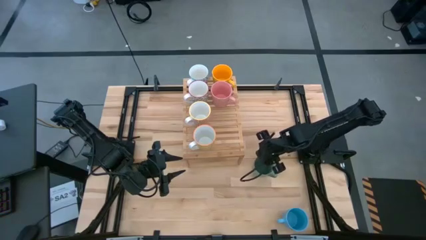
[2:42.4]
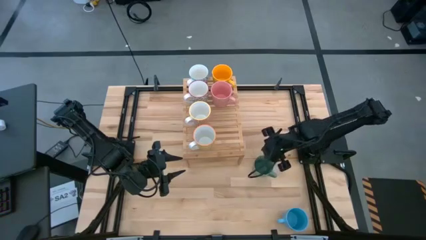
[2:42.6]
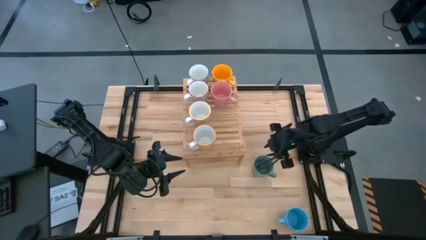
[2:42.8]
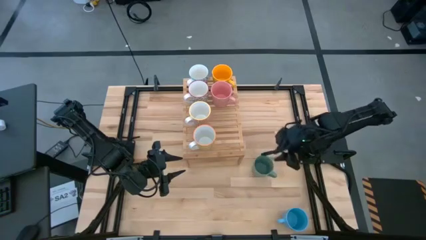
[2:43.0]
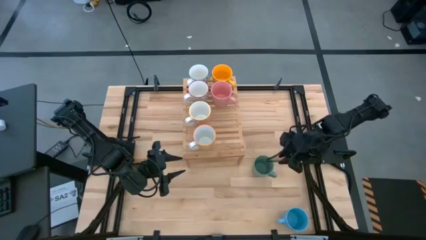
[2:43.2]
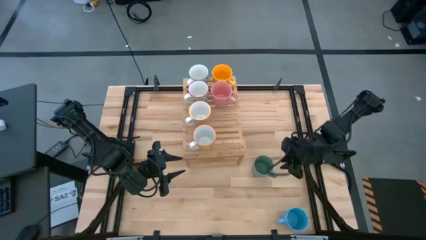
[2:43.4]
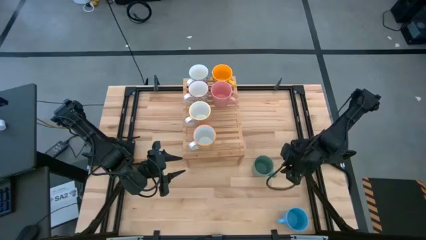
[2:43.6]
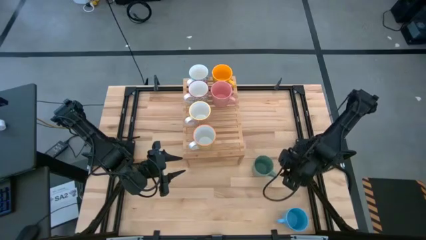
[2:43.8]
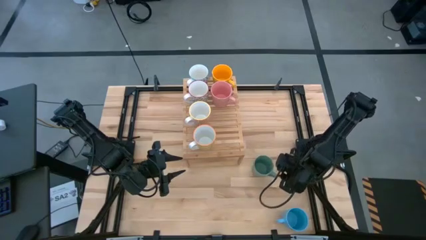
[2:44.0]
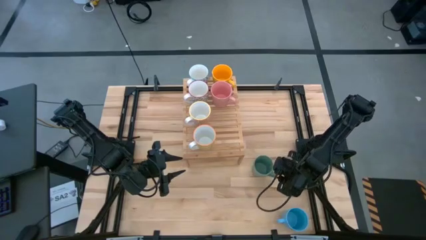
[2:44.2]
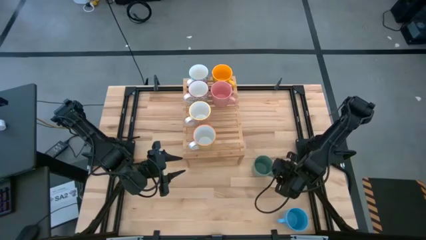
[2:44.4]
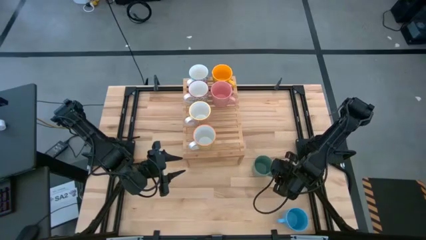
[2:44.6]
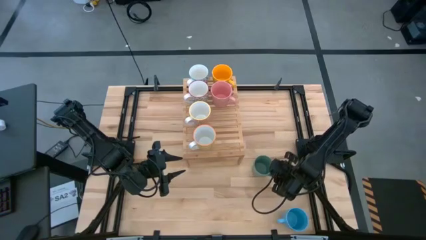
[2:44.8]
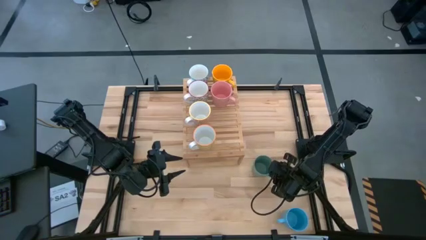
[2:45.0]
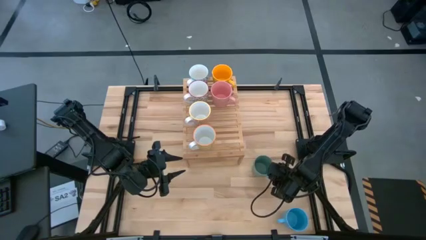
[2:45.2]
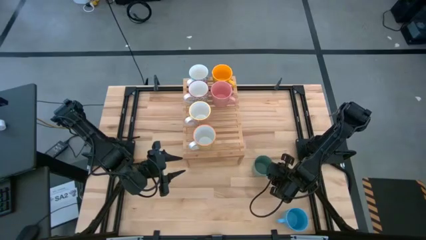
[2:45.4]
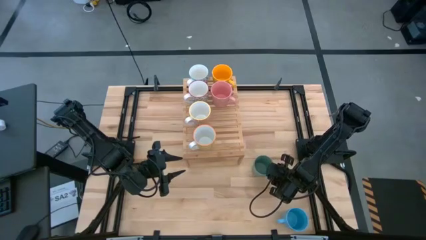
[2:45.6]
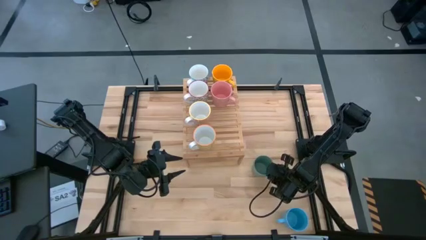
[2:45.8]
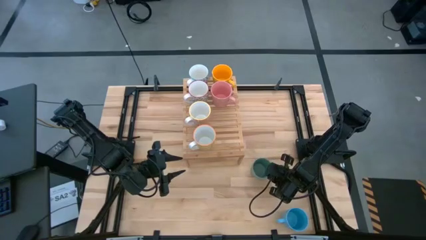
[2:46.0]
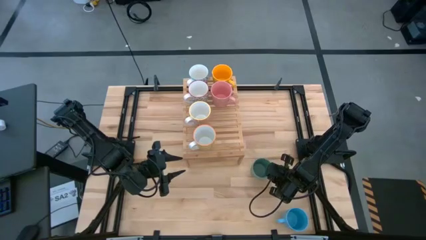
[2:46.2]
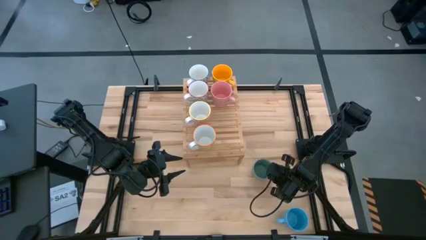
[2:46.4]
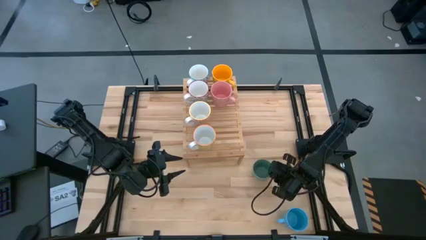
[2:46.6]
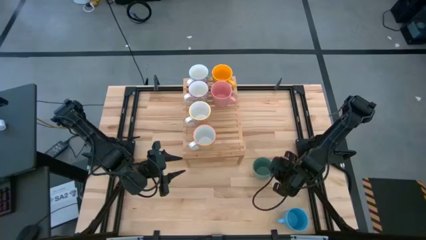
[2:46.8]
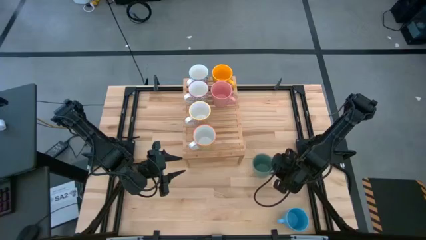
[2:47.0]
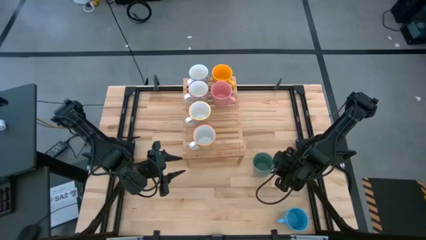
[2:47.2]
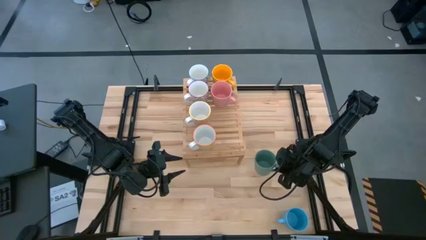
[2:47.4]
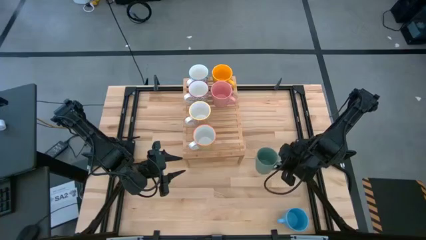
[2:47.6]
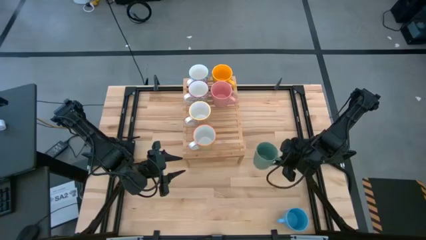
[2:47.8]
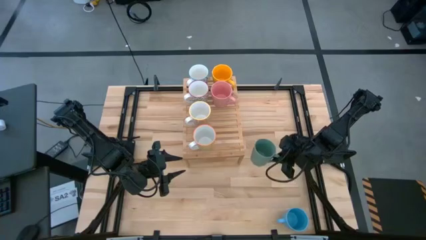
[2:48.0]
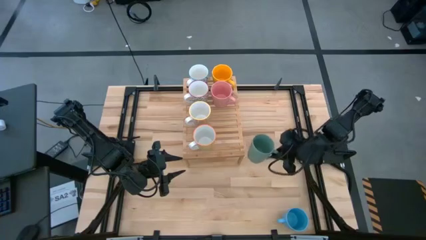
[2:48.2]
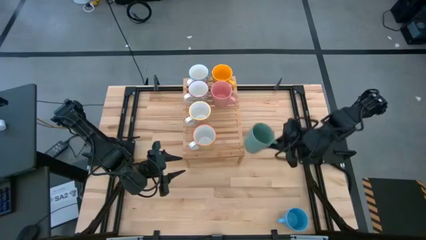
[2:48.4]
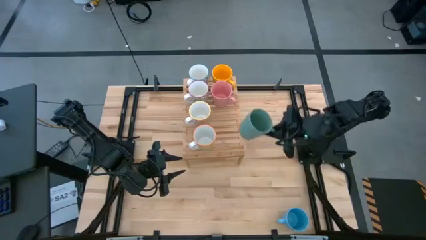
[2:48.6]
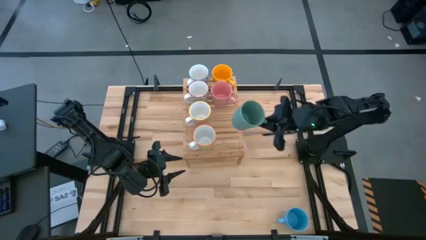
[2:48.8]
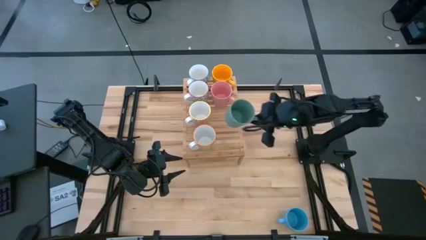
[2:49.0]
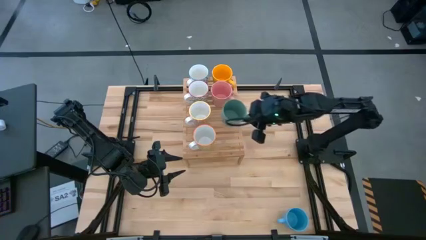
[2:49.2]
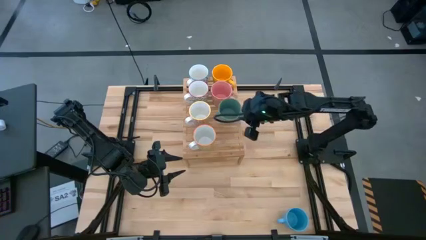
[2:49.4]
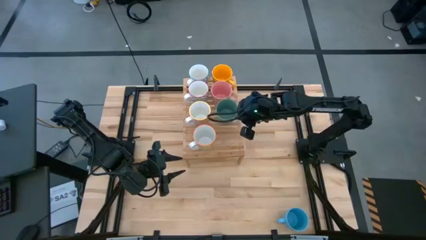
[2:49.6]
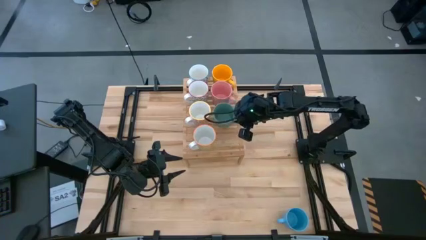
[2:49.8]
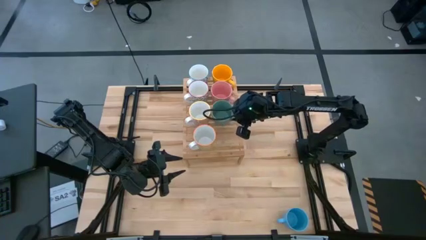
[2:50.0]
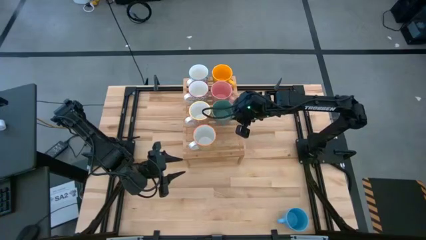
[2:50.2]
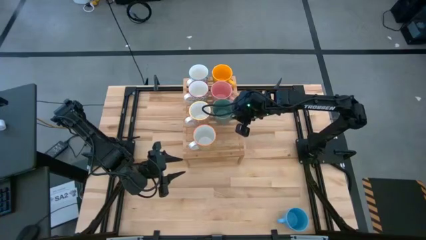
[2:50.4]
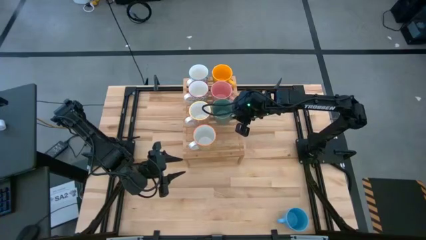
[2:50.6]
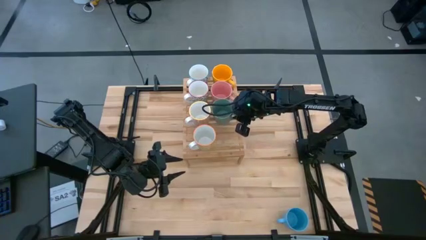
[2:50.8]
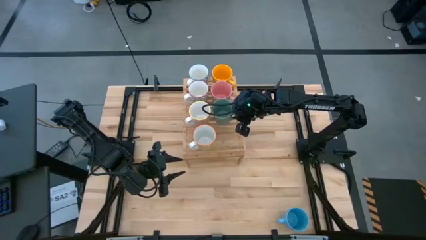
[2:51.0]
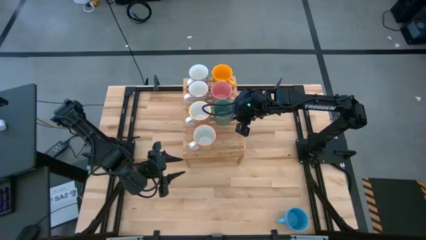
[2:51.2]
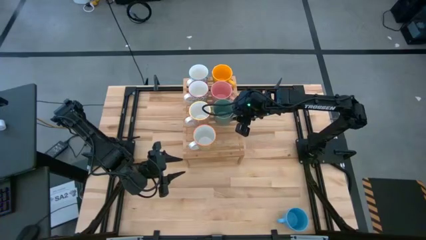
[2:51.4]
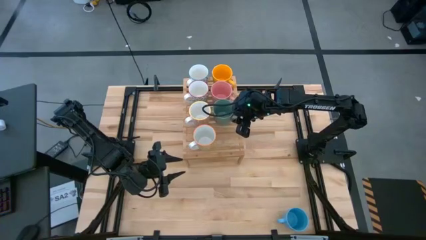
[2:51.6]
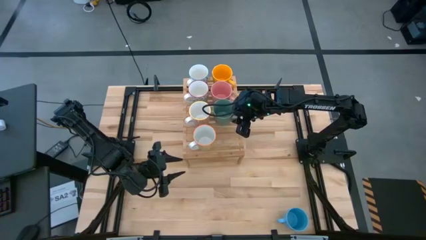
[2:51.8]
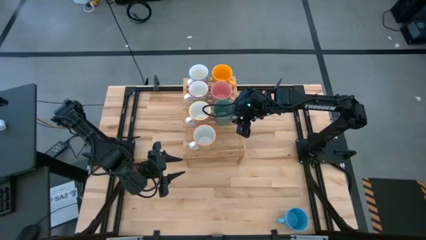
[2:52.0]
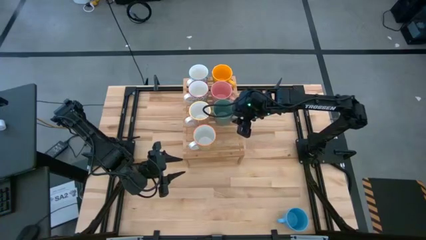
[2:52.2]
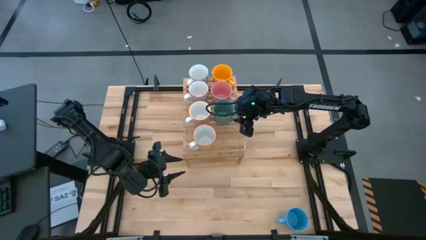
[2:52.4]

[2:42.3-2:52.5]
Task: Place coffee mugs
Put the green cup on the shelf aligned with the other pink cup

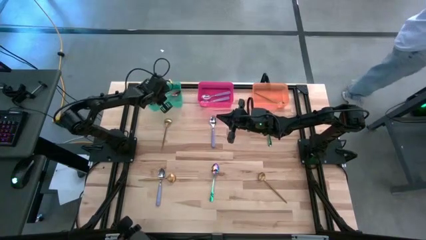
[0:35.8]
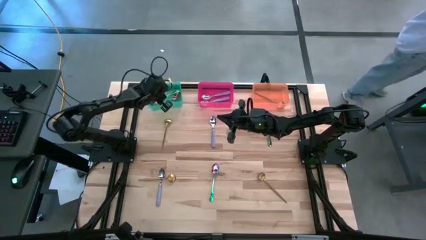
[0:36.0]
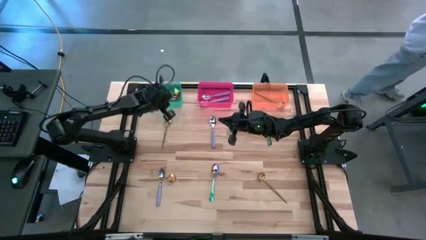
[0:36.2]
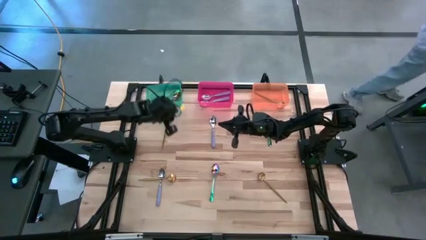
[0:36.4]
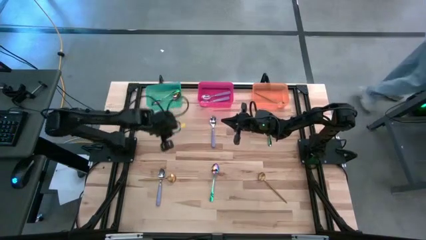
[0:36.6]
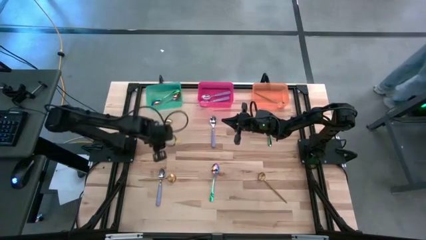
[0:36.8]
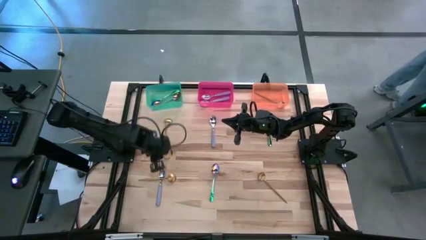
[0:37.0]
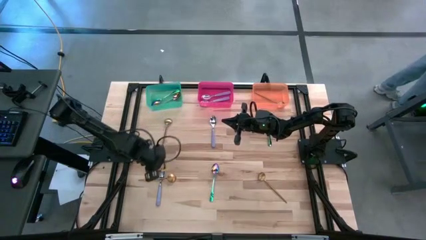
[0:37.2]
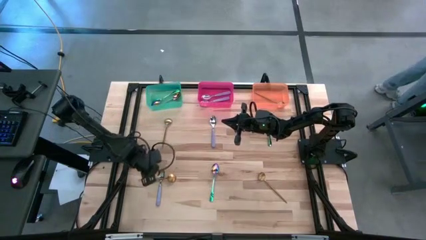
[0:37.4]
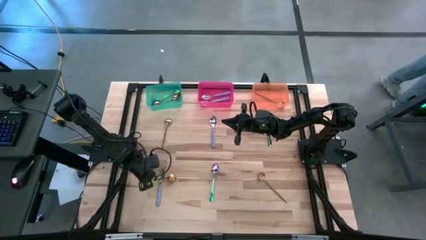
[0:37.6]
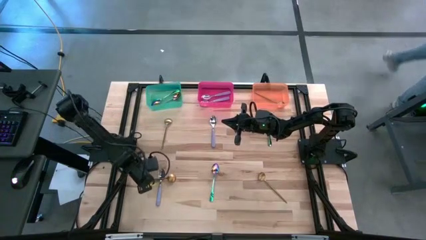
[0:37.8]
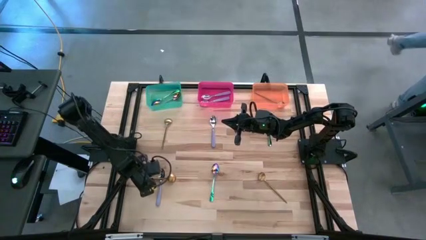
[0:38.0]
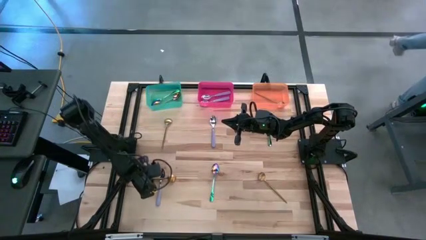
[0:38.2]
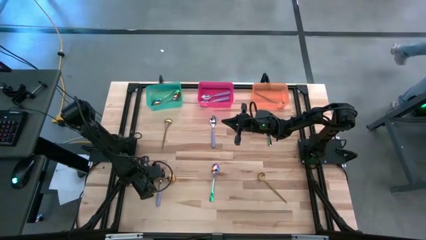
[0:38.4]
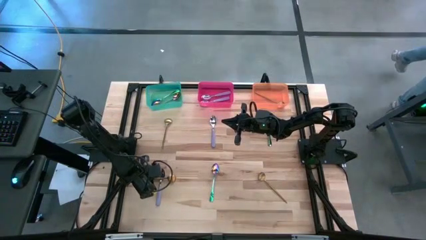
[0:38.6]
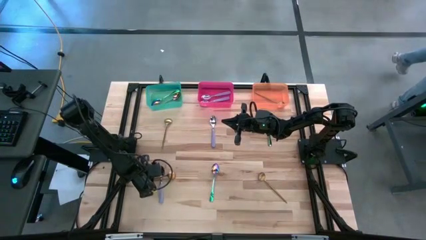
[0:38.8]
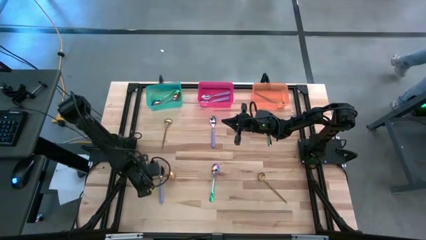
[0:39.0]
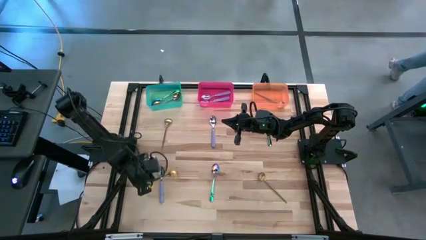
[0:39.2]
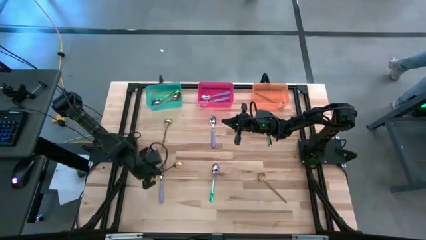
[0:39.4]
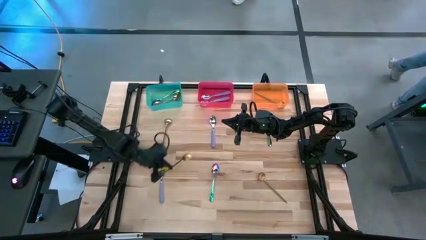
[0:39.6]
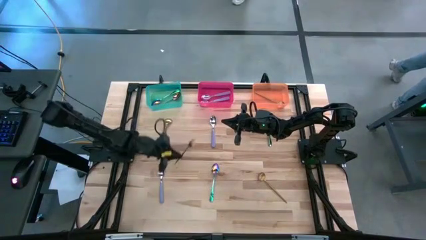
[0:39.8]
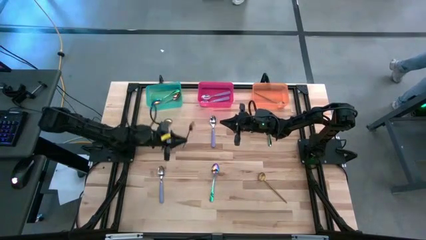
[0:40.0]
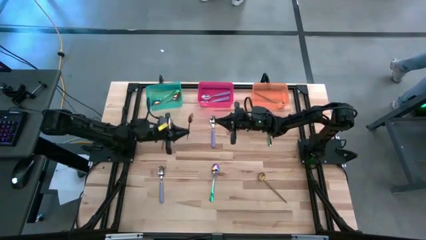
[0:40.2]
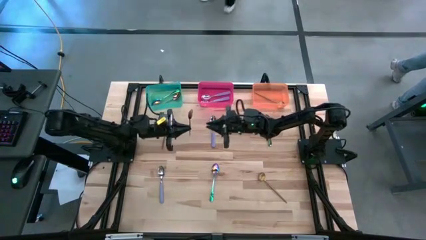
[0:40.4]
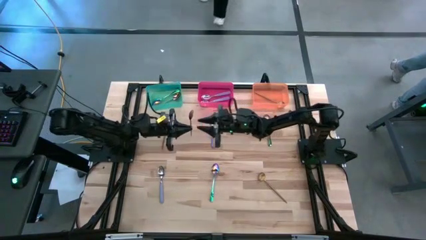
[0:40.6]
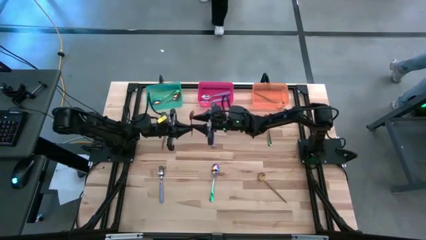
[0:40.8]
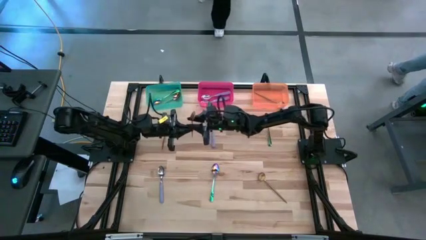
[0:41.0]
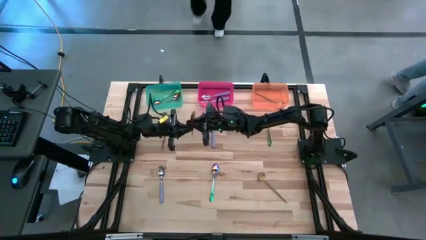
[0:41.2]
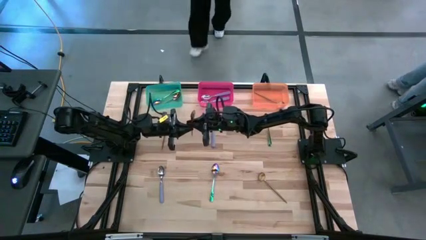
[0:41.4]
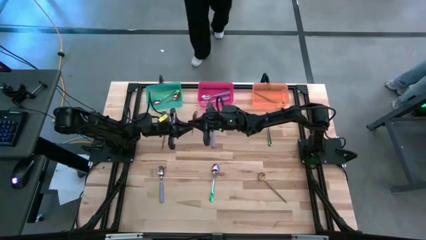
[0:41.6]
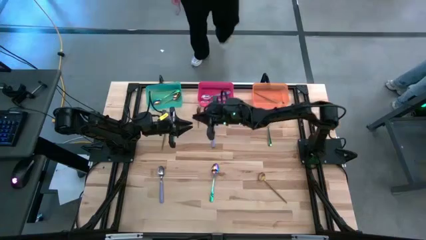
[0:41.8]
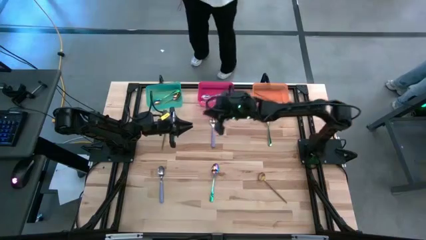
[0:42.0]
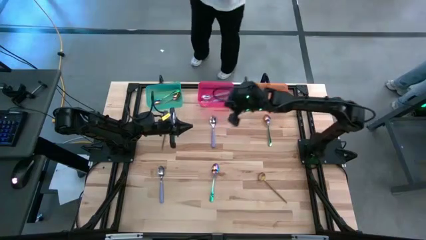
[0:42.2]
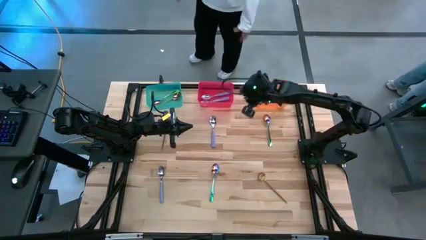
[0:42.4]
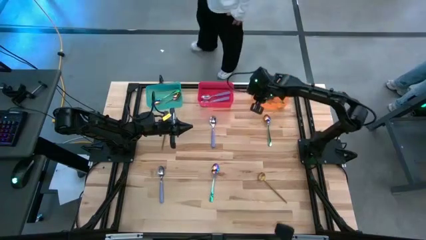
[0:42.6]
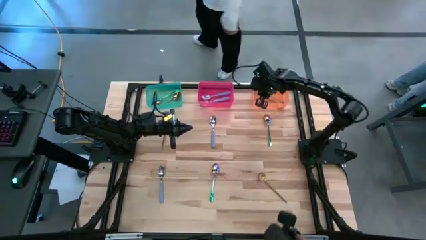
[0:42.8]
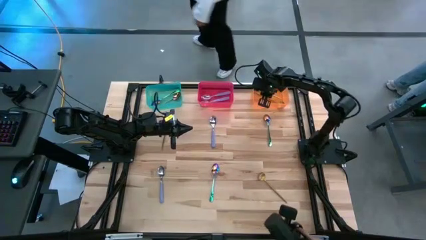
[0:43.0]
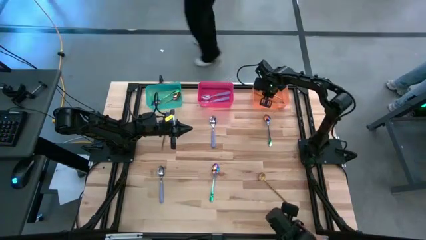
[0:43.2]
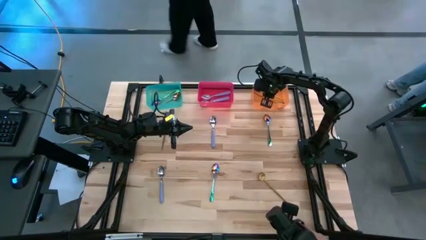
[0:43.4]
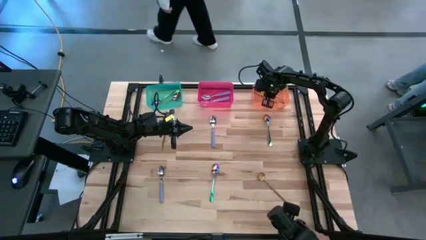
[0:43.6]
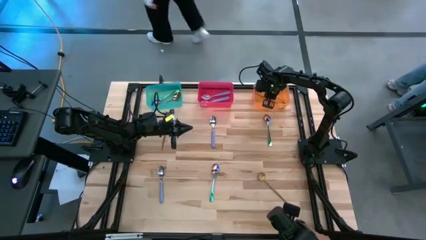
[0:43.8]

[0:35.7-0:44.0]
Task: Sort silverware by color (type)
Put the gold spoon into the orange bin
